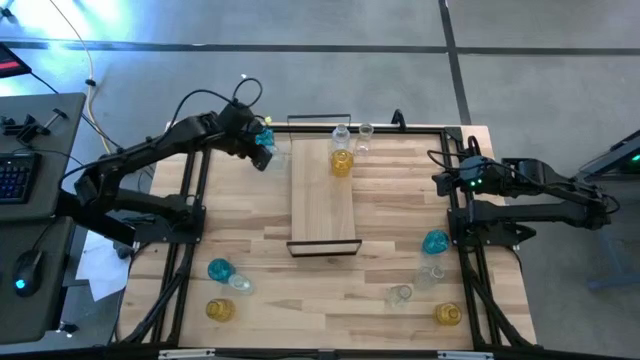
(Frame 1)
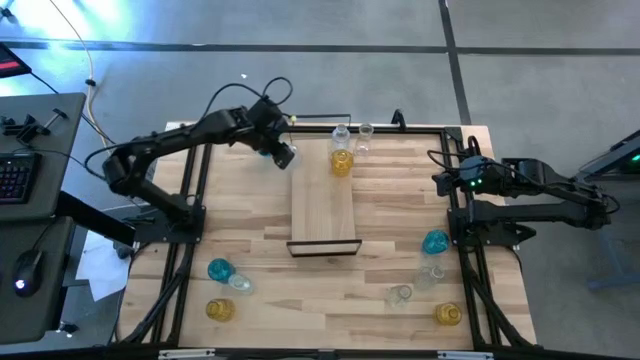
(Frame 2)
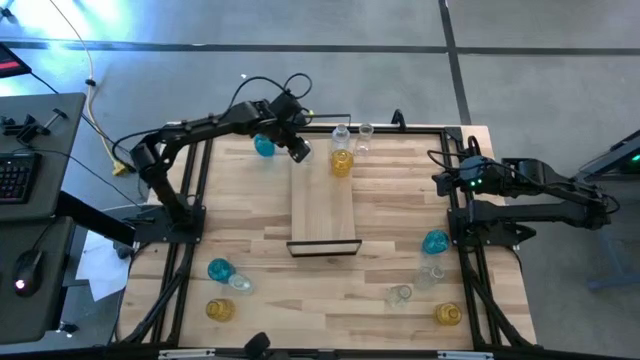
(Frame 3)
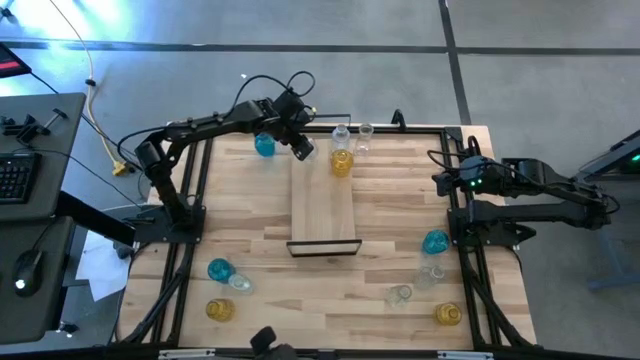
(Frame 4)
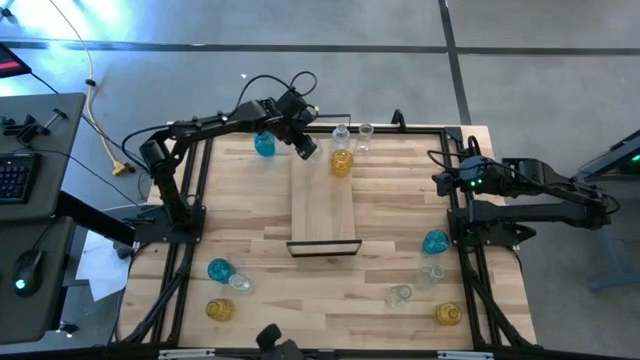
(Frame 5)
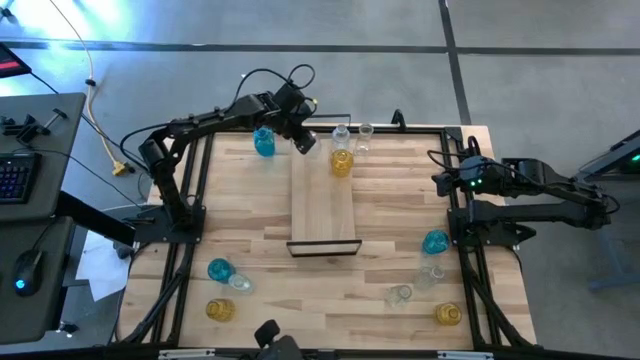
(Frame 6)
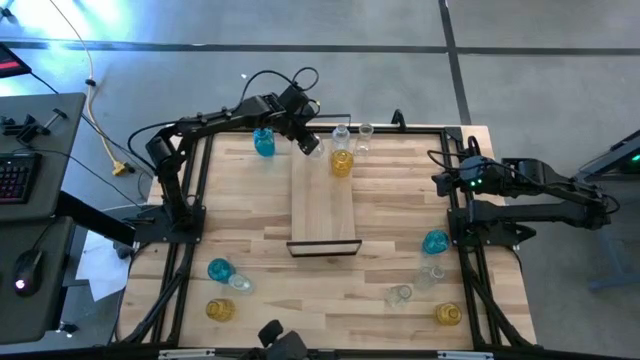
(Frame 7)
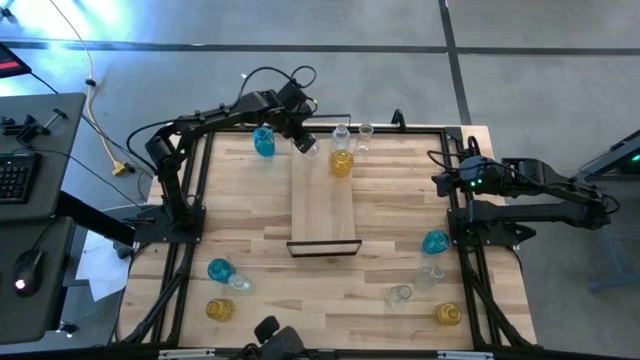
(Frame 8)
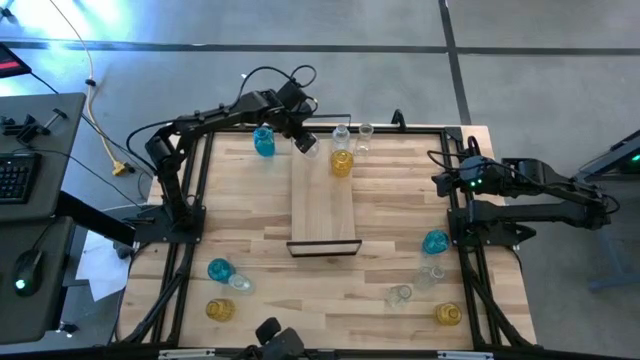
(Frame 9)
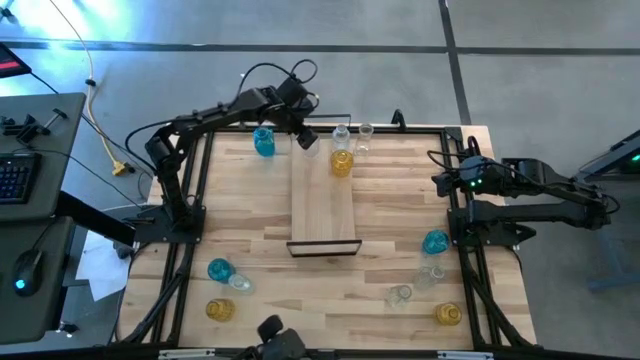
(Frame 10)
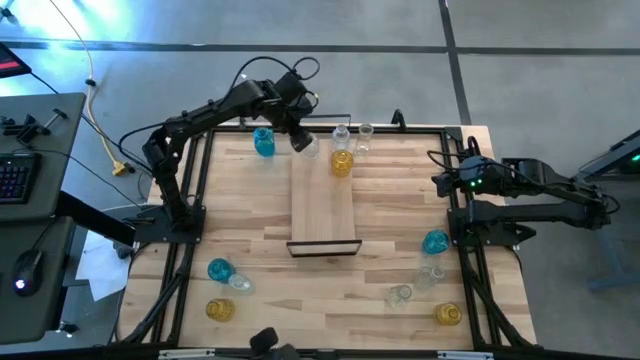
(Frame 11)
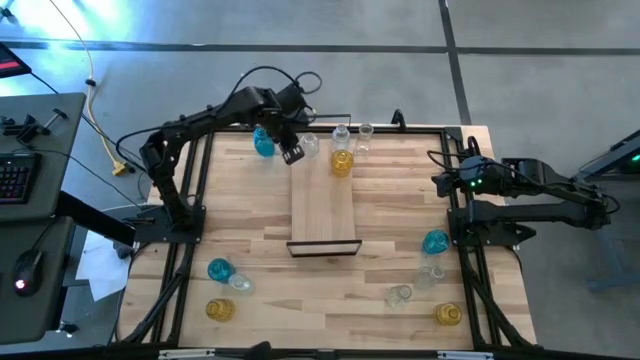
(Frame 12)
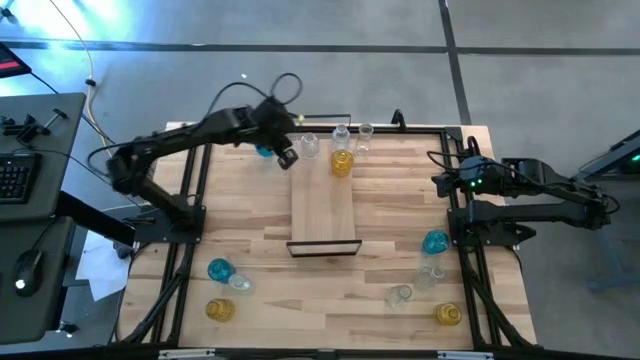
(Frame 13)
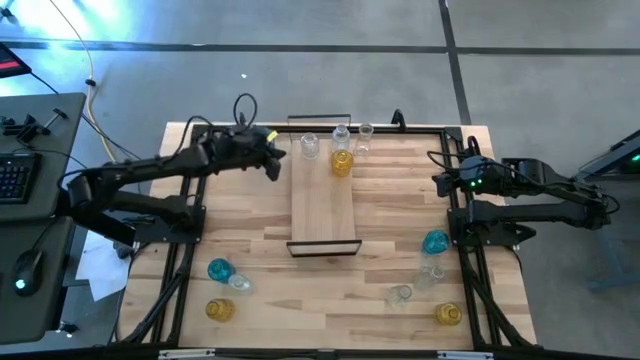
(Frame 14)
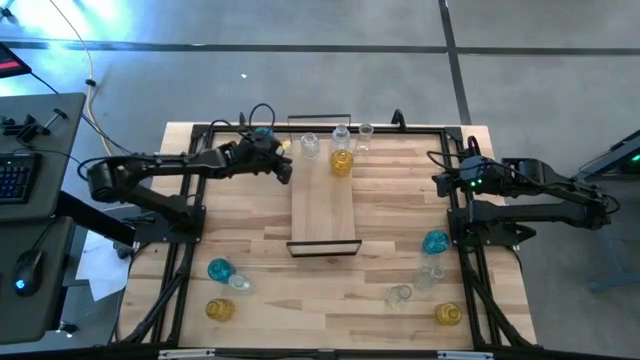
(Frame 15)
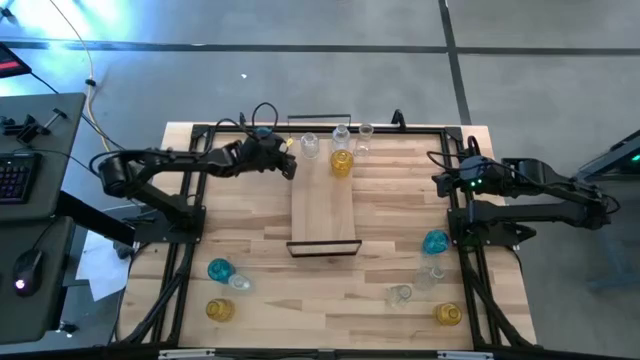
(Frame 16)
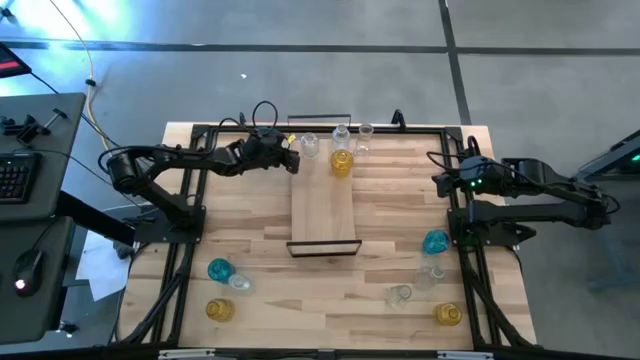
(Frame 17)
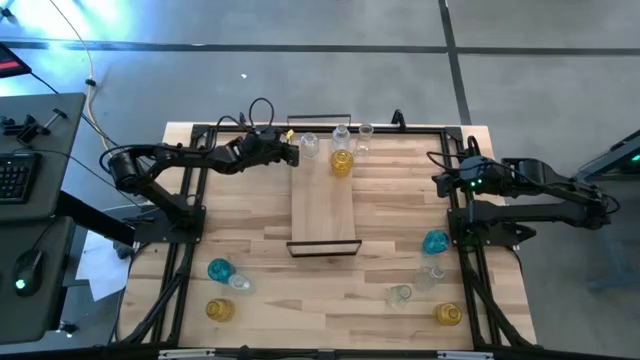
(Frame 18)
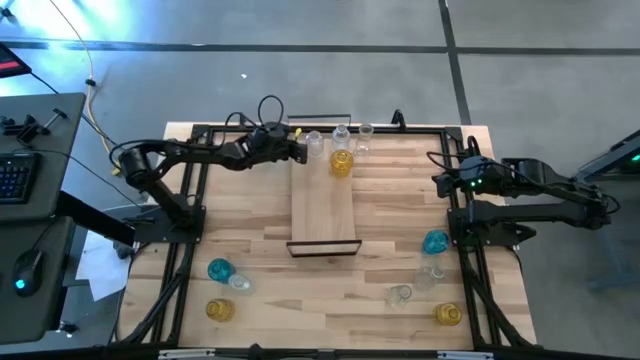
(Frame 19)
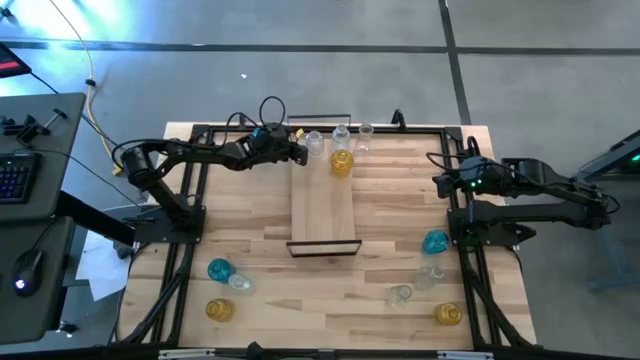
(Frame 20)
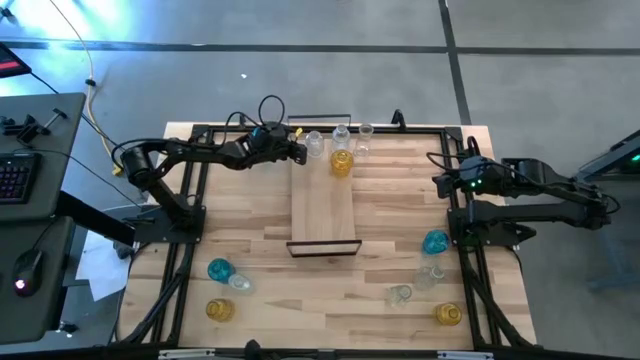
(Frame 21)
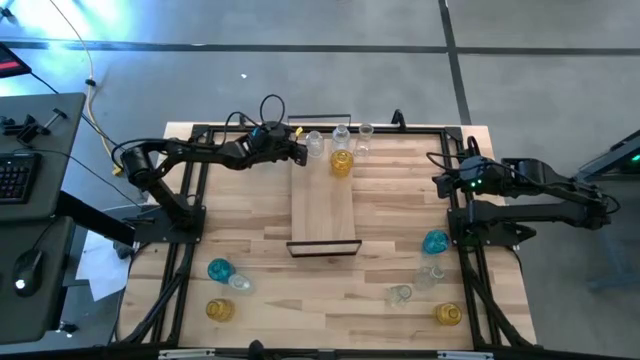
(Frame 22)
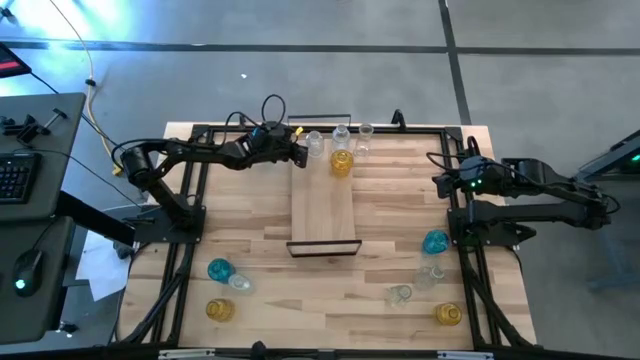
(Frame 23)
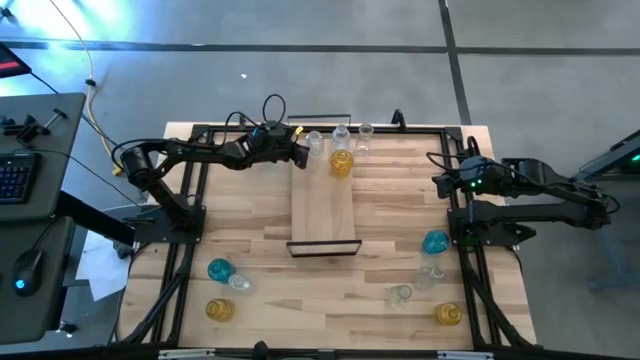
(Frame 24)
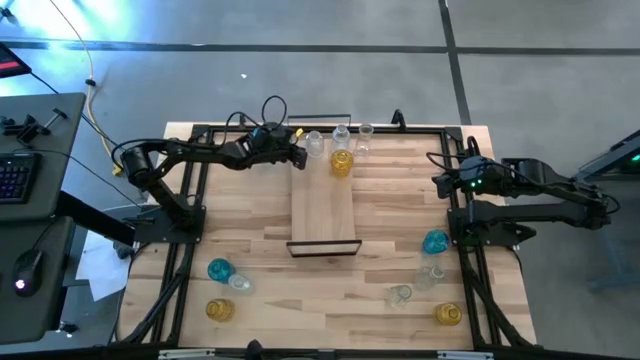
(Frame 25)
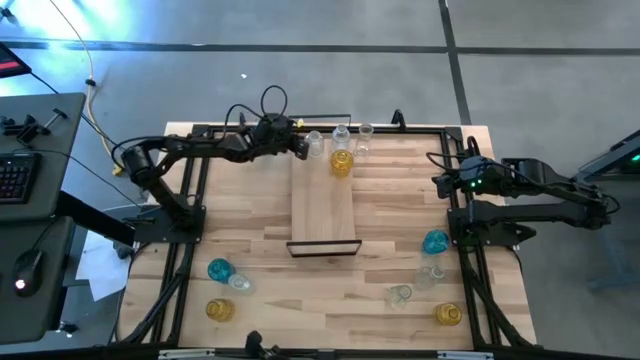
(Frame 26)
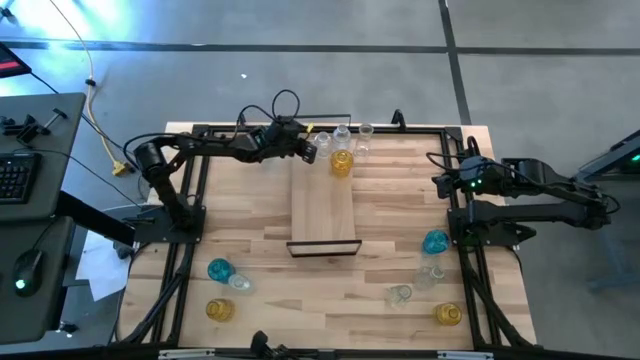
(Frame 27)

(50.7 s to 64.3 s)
Task: sort vases onto shelf
Put the top left transparent flower vase on the shelf aligned with the other transparent flower vase

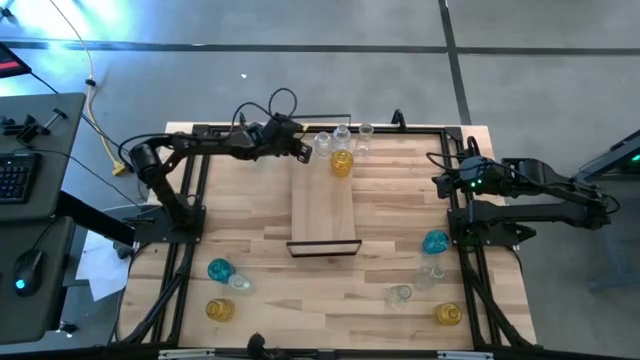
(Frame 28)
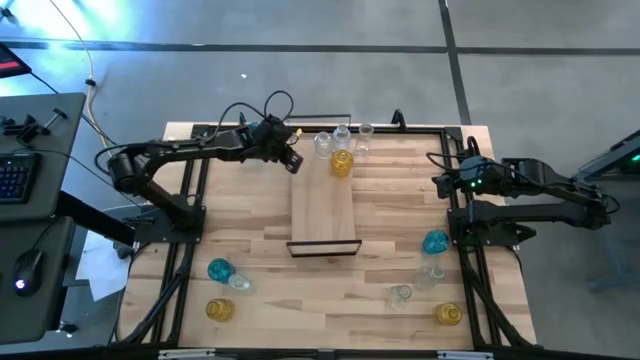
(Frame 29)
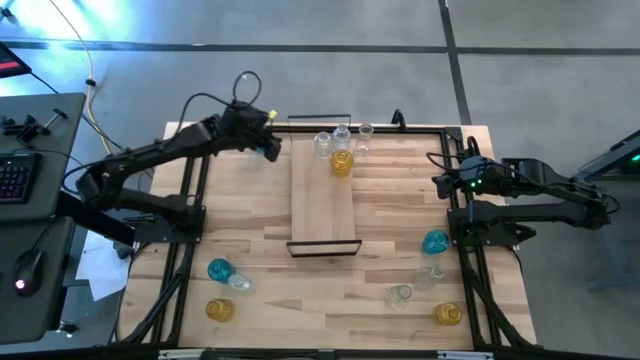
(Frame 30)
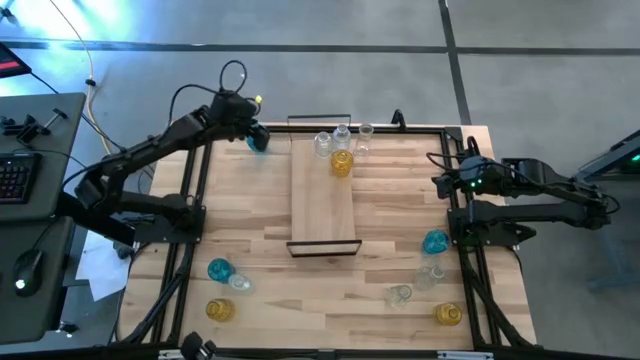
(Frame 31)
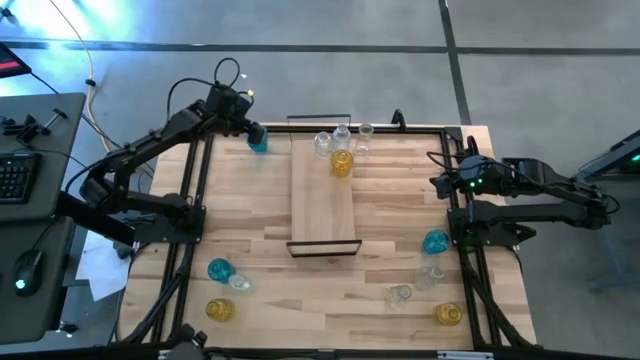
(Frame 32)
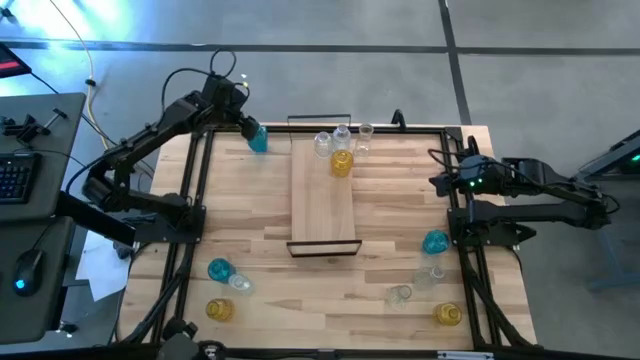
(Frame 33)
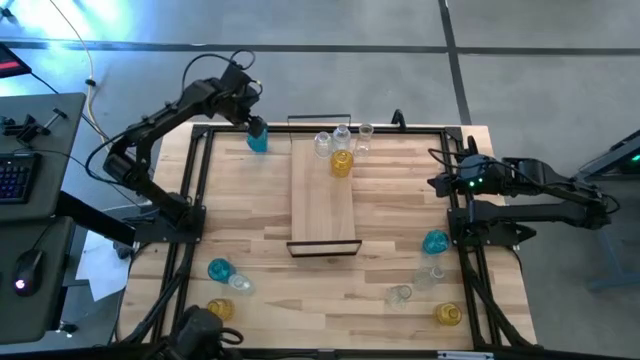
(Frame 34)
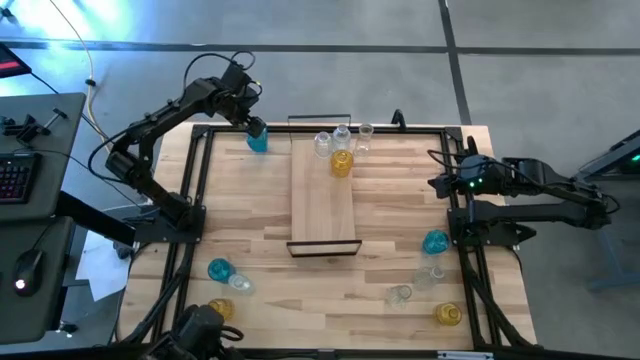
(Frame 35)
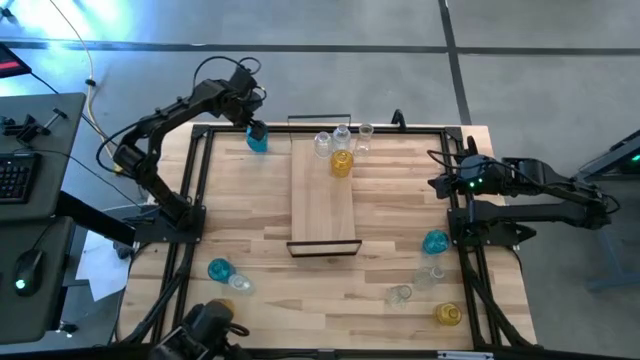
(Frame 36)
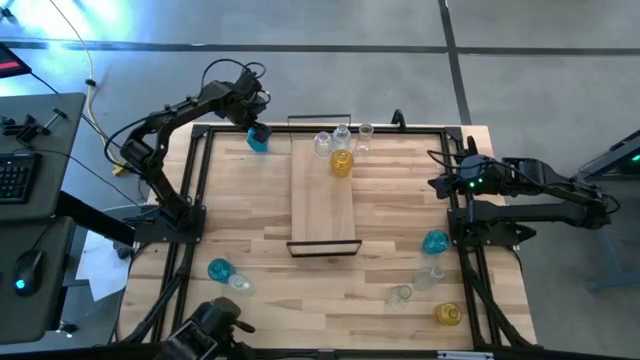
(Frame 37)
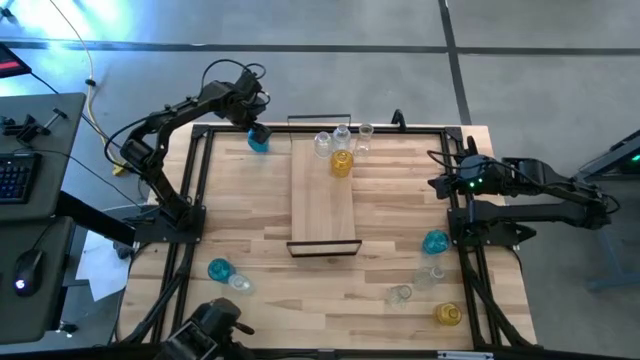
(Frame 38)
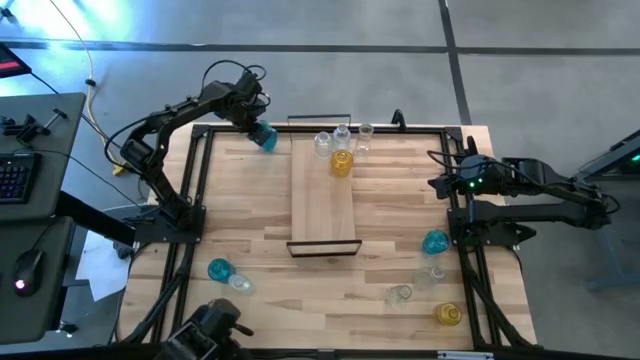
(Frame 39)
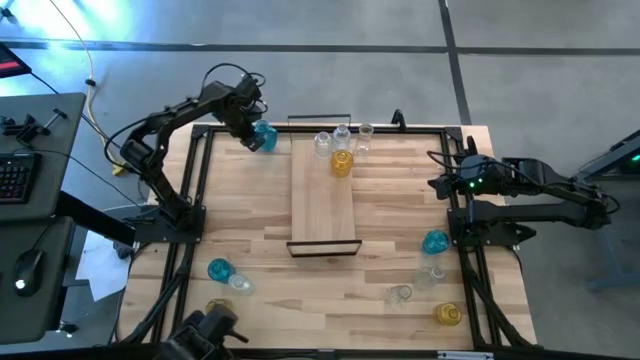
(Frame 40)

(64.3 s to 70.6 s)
Put the top blue flower vase on the shelf

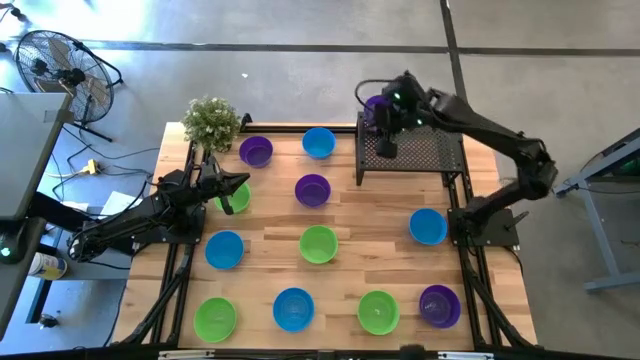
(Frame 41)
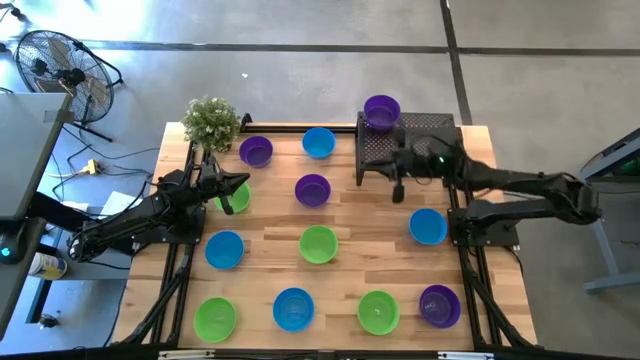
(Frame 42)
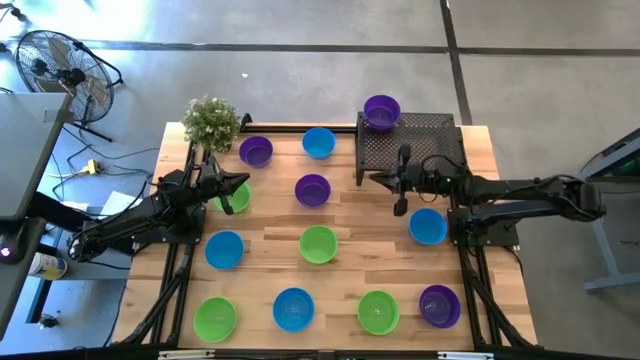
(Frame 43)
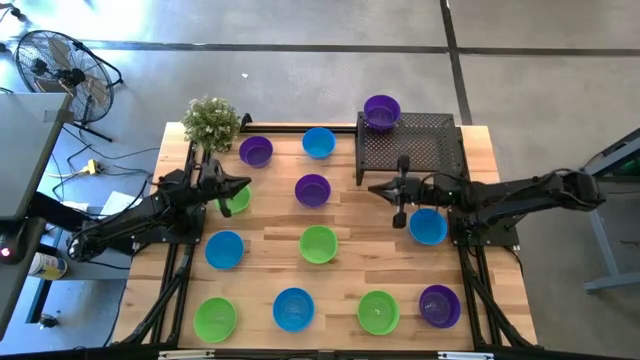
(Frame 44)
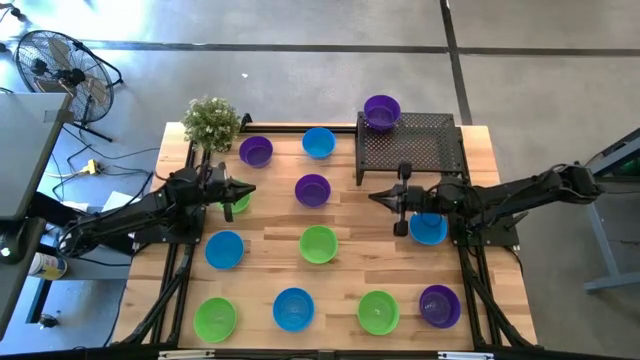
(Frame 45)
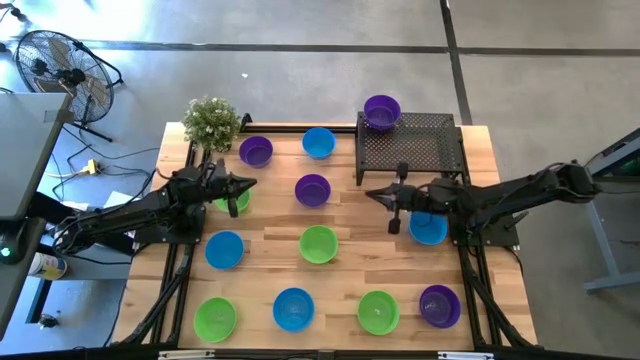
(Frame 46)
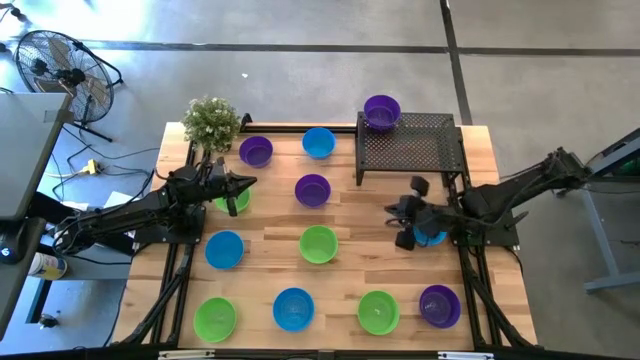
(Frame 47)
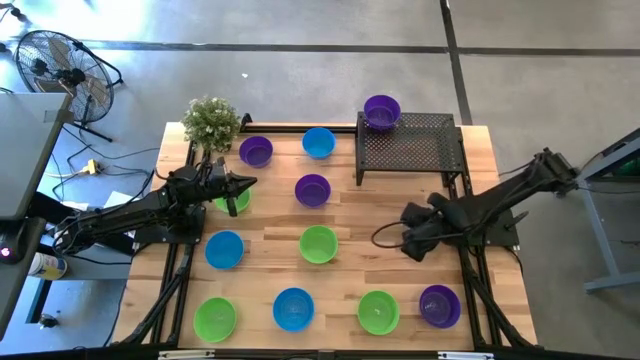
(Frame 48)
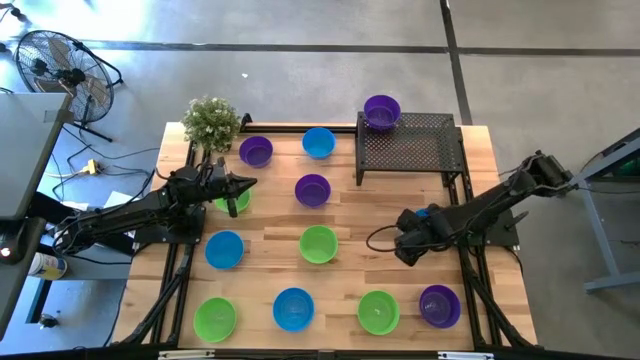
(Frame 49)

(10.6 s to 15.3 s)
Task: Pick & Place Mini bowls
Put the blue bowl on the shelf
